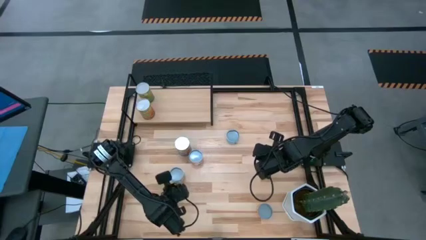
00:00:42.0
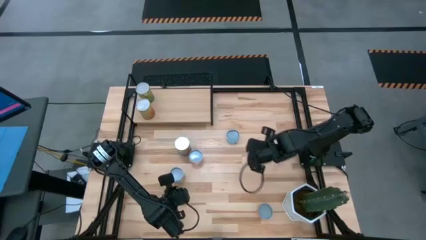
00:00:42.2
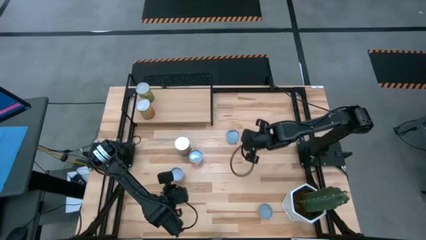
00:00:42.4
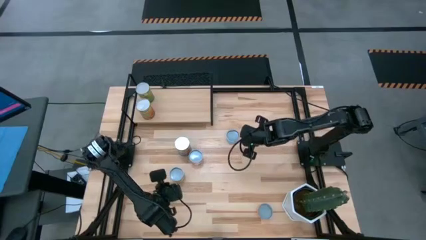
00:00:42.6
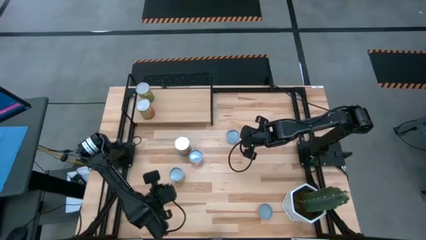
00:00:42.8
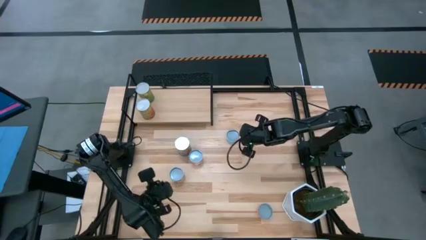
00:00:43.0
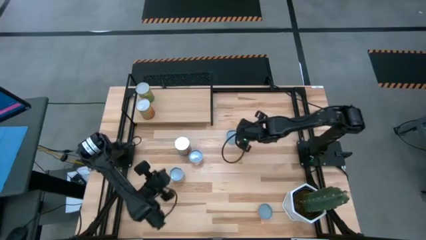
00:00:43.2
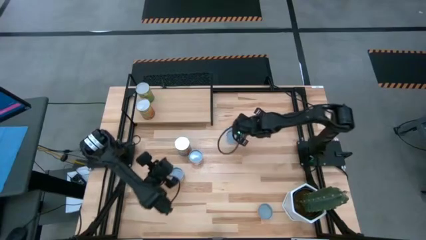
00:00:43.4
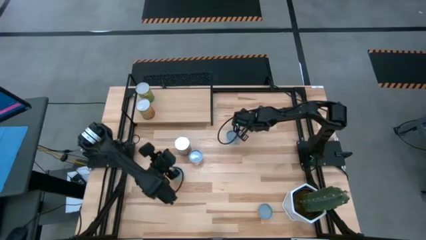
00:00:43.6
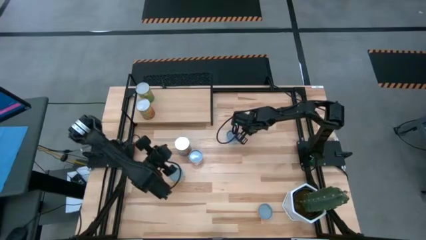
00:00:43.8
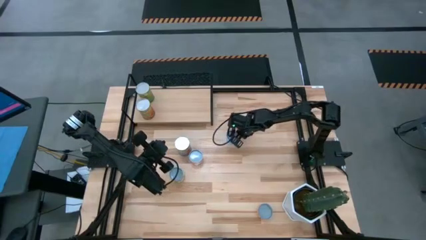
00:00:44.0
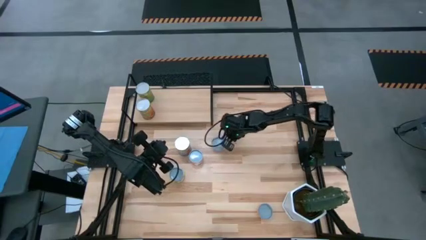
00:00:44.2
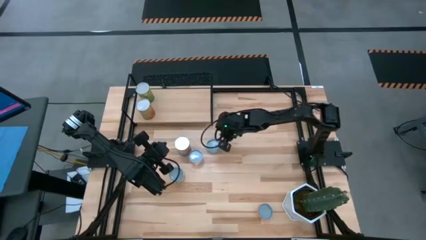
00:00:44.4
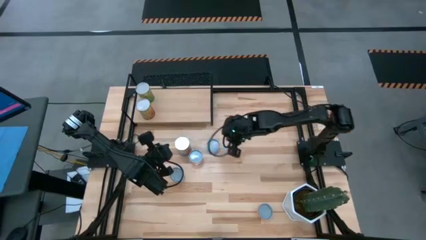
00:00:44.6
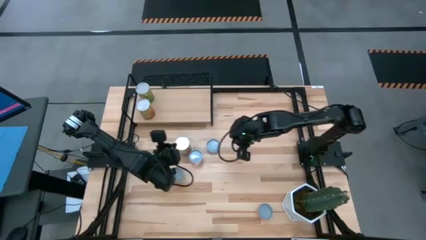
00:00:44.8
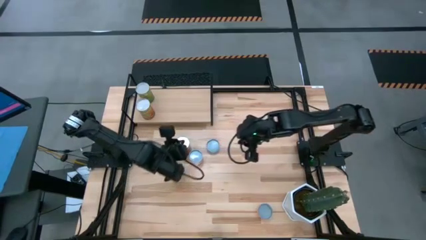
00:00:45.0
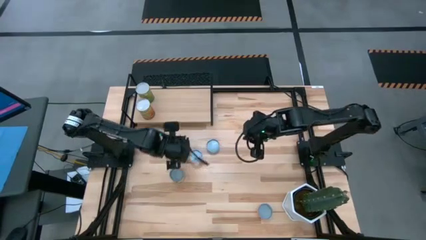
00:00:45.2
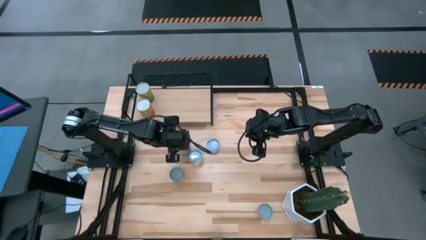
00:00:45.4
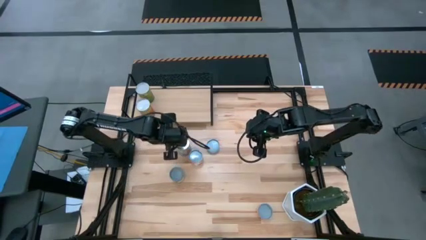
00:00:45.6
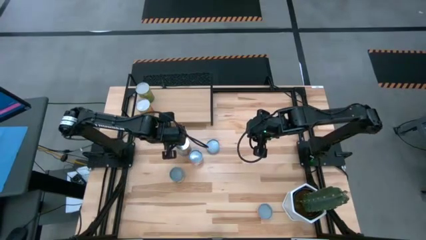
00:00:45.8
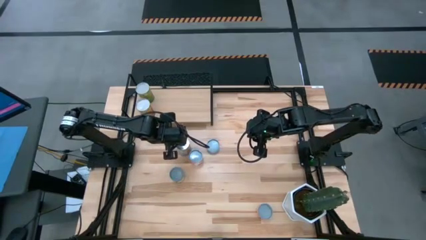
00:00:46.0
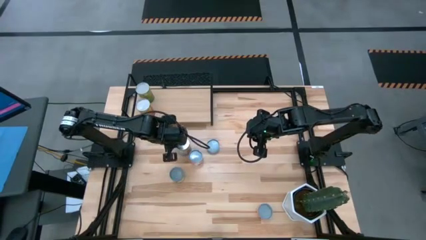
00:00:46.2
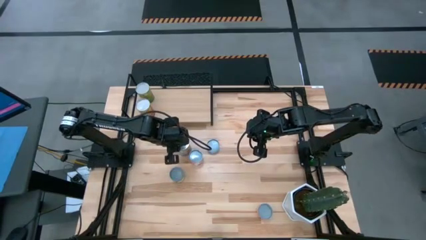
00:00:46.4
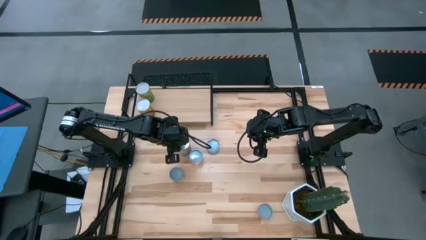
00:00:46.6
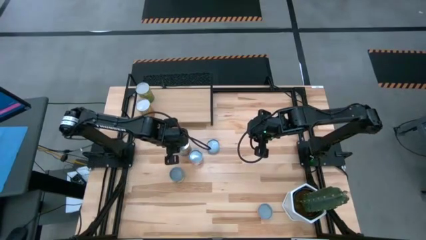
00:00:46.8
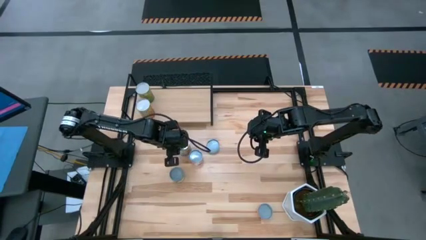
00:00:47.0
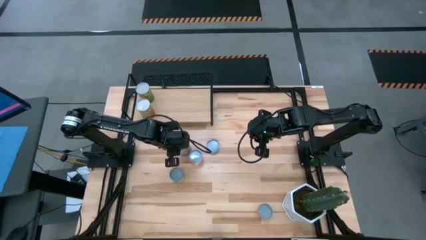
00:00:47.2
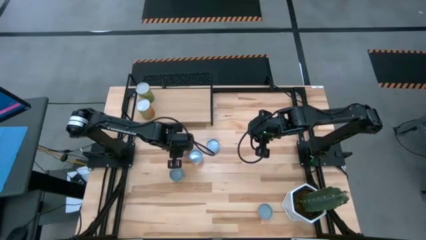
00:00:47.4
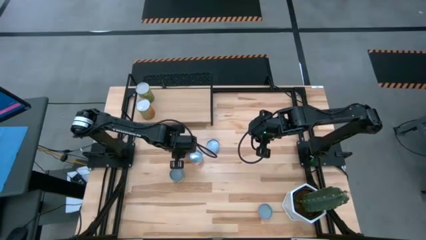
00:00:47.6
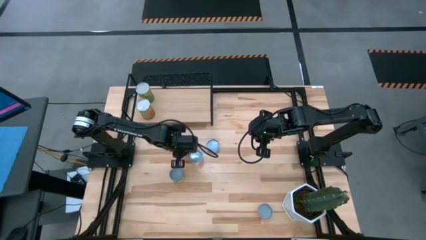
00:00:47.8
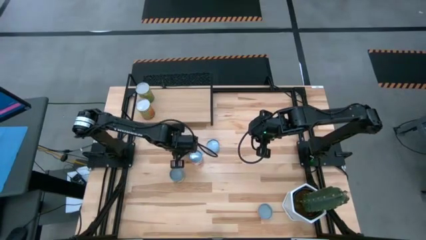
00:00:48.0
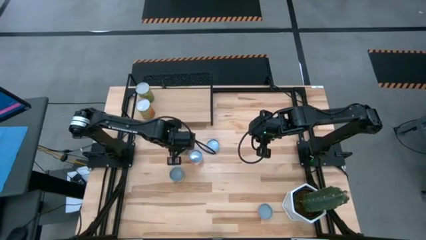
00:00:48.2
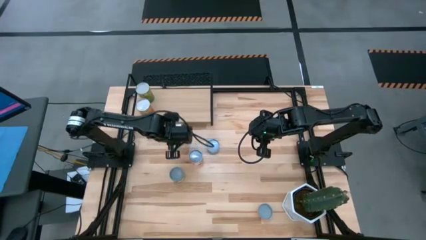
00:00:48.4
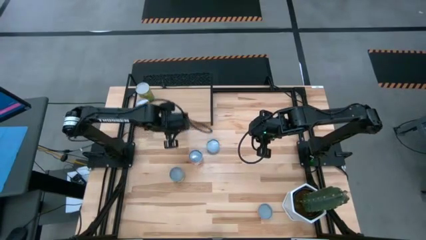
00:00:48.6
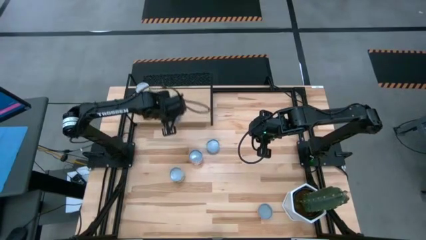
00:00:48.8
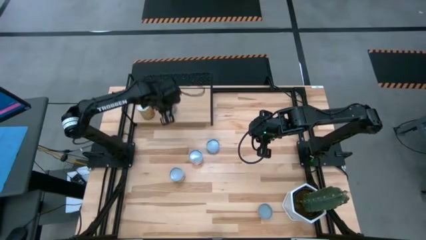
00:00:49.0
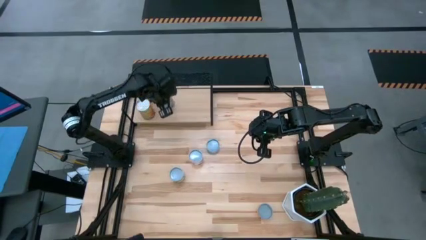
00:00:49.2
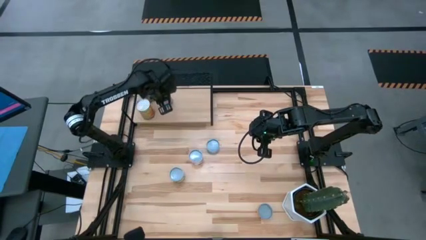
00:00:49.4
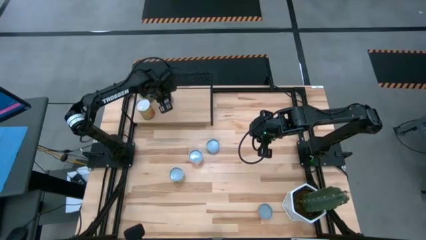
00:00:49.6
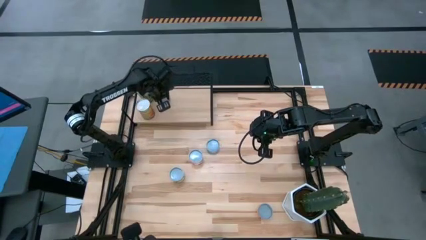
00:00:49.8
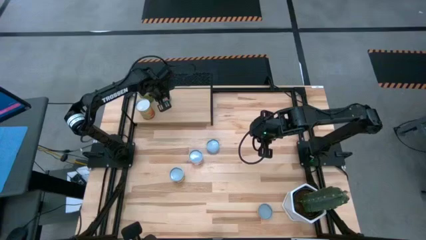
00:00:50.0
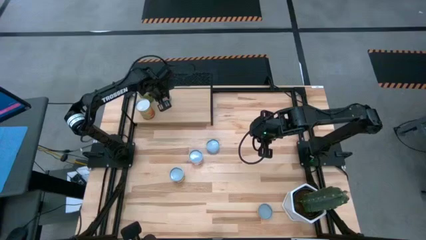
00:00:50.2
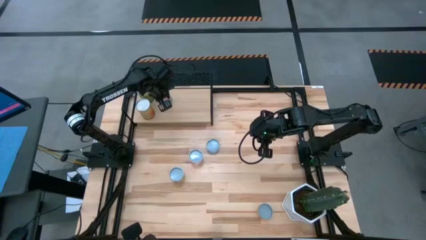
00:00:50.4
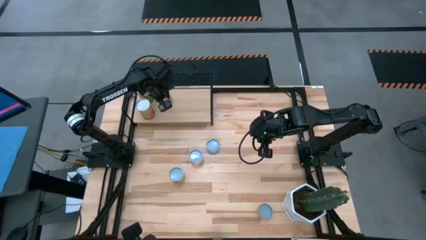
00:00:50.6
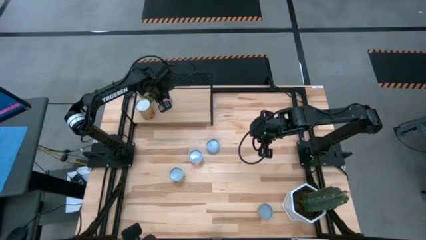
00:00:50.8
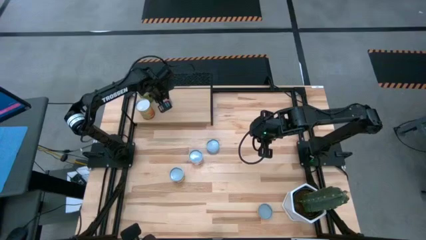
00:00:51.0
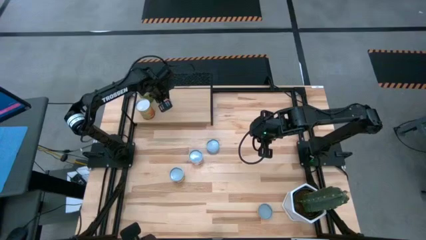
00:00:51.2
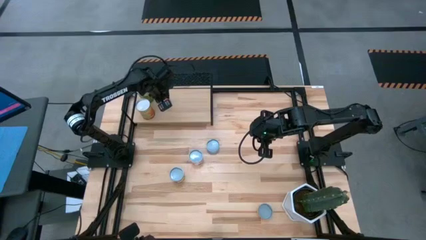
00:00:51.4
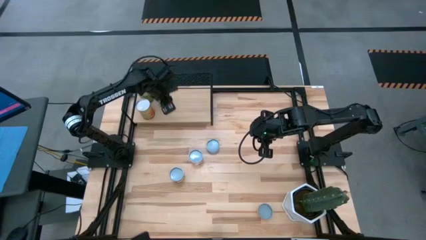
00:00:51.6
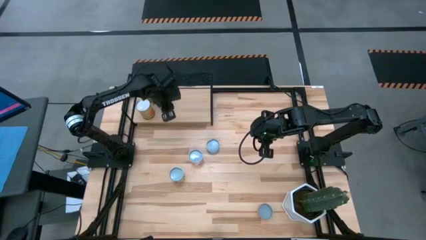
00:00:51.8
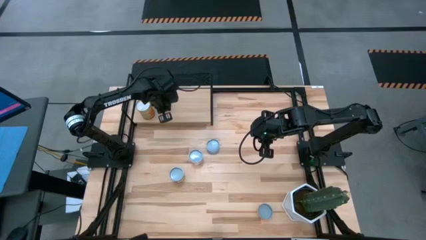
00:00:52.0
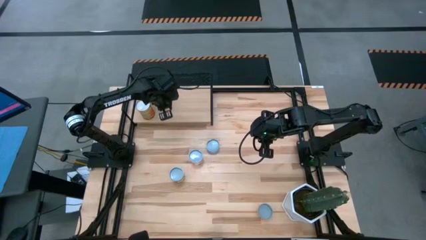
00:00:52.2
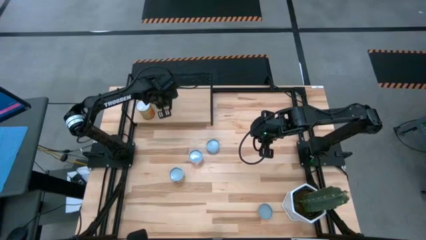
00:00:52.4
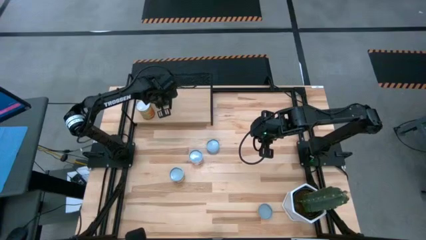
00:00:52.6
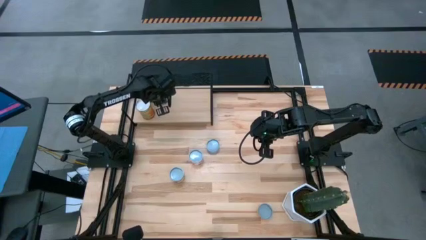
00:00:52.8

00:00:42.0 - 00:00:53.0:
Task: Pick and place cans onto a shelf
Put the canned tomatoes on the shelf

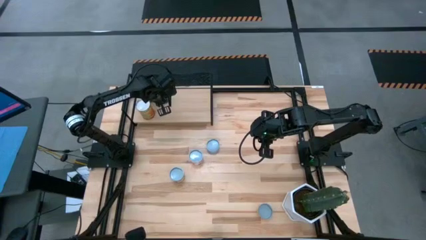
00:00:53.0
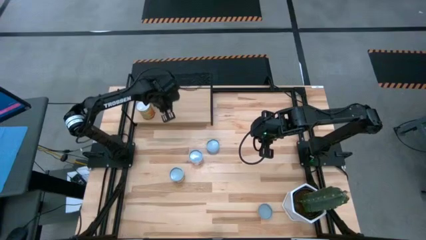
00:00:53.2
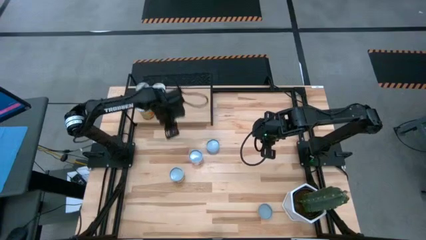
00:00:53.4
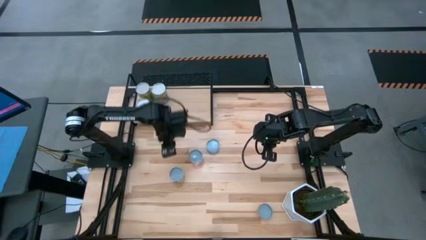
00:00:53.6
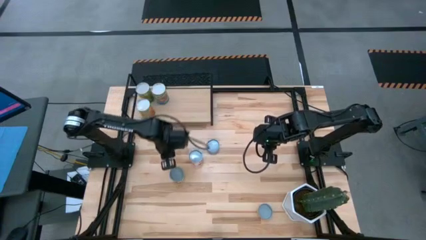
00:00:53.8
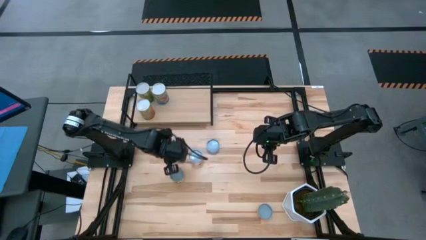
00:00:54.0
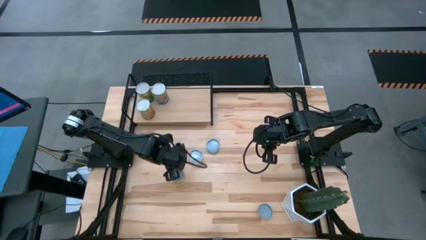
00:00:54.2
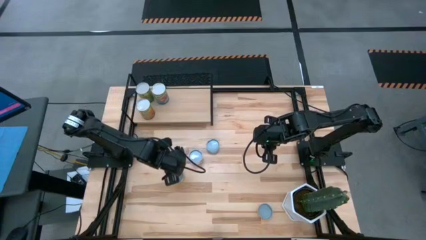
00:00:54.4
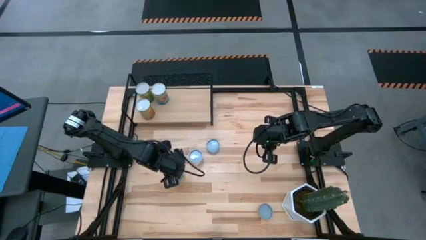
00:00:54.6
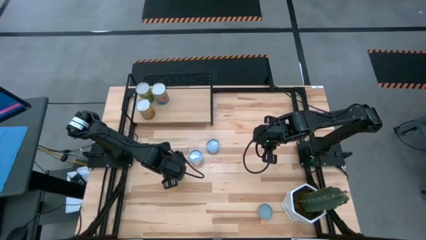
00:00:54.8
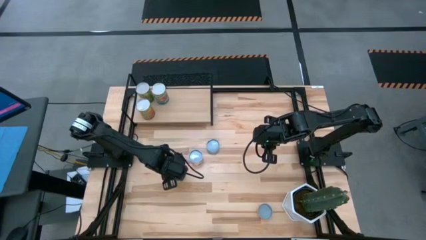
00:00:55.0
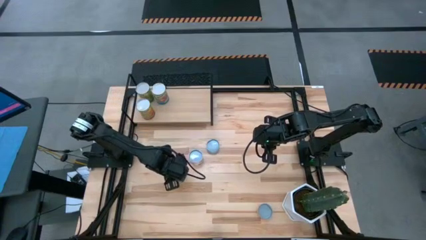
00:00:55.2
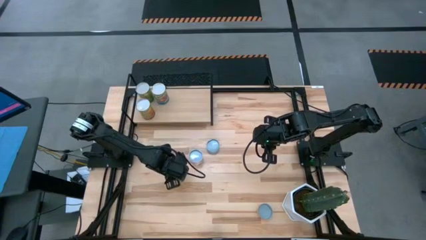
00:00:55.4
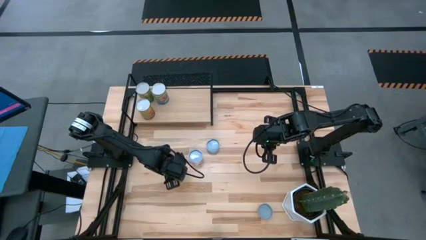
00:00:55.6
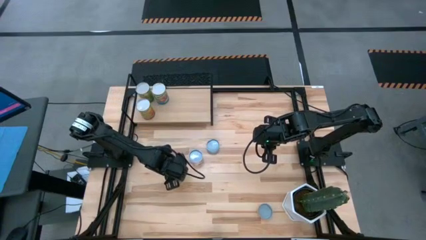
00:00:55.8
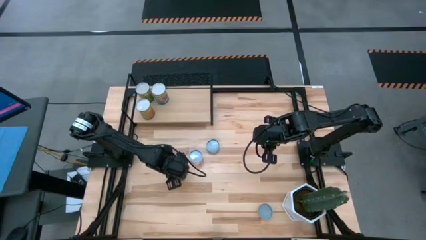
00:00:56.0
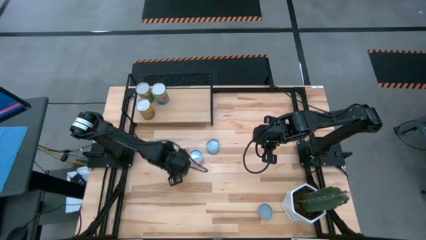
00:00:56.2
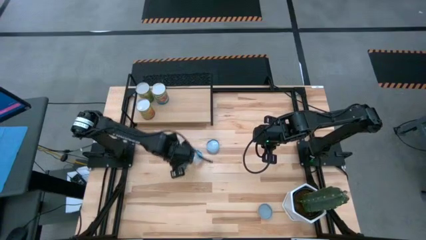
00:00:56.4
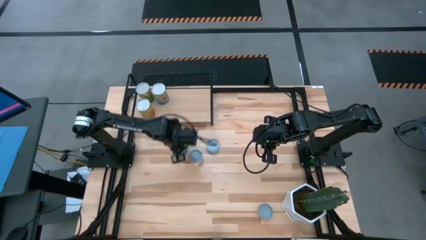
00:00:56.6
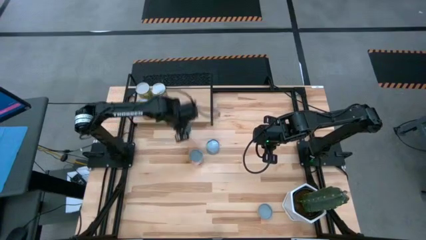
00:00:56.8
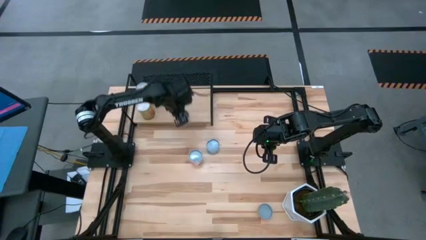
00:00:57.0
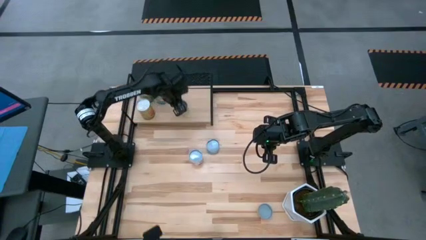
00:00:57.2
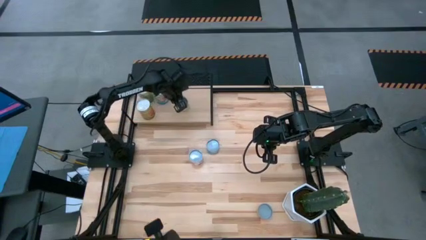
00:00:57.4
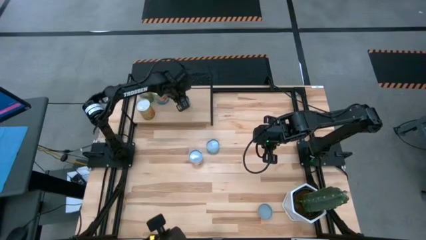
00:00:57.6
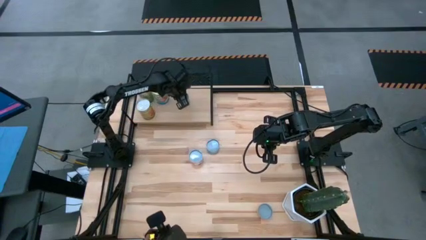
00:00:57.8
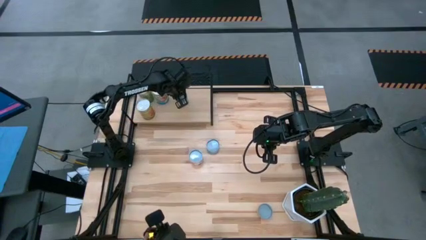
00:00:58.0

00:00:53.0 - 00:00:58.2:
Put the canned peaches on the shelf
